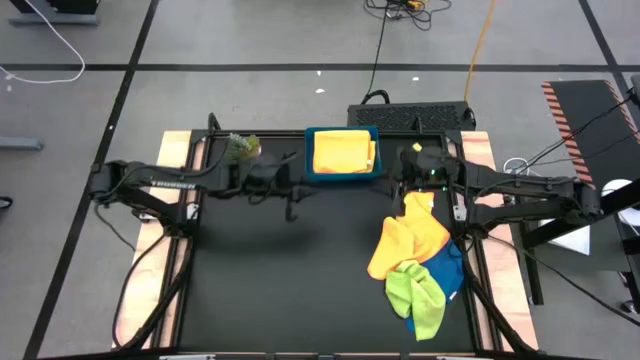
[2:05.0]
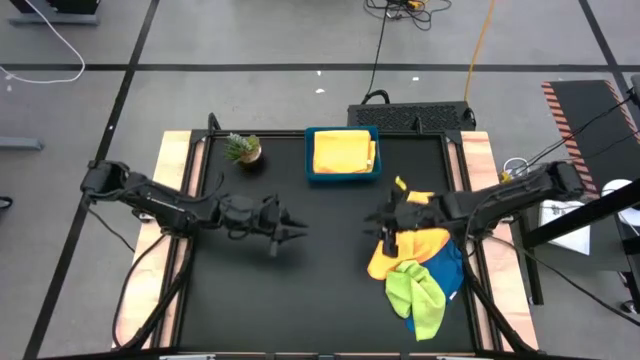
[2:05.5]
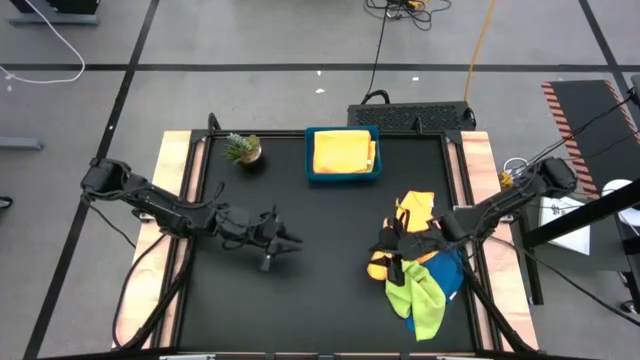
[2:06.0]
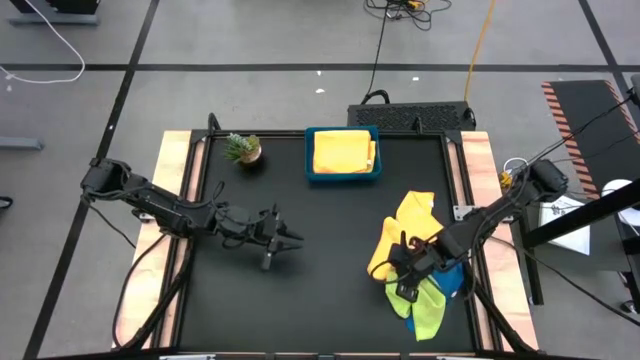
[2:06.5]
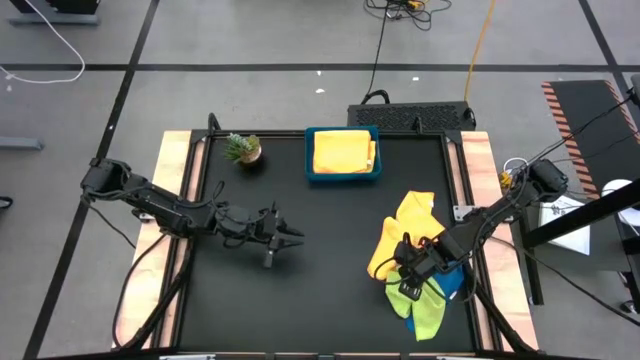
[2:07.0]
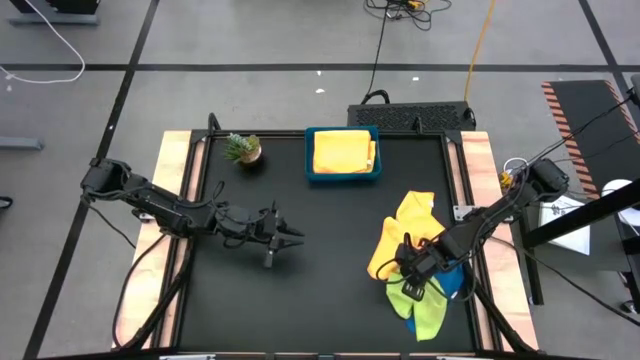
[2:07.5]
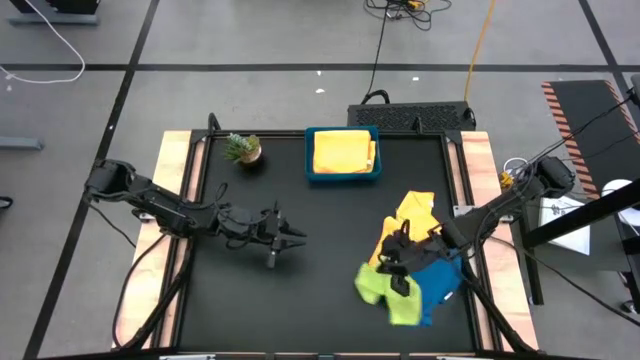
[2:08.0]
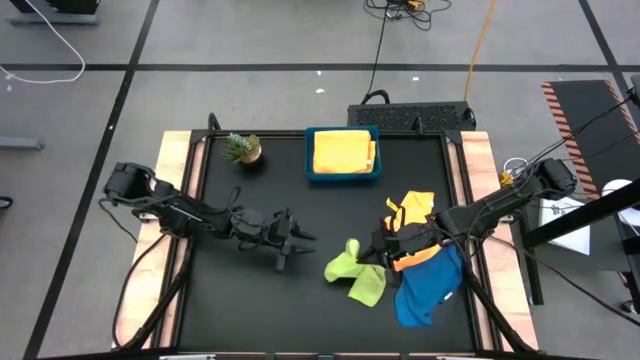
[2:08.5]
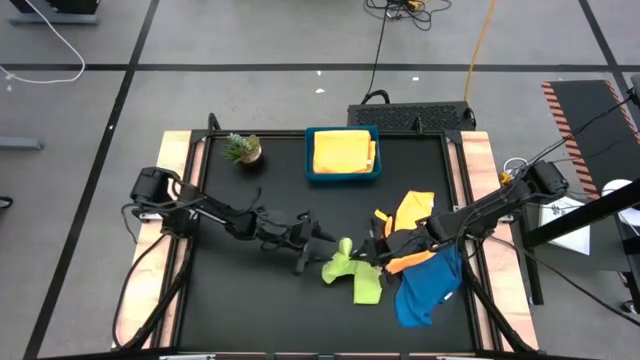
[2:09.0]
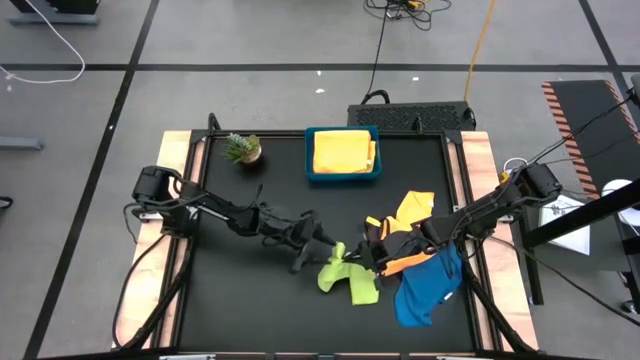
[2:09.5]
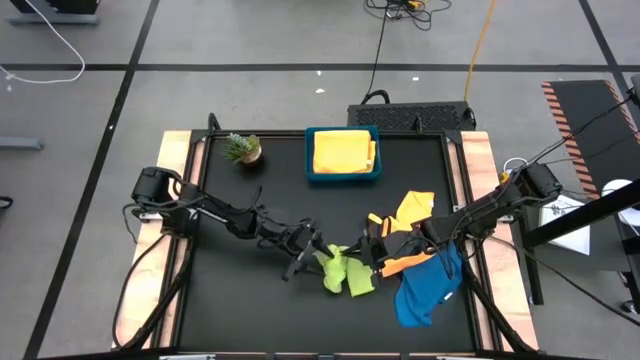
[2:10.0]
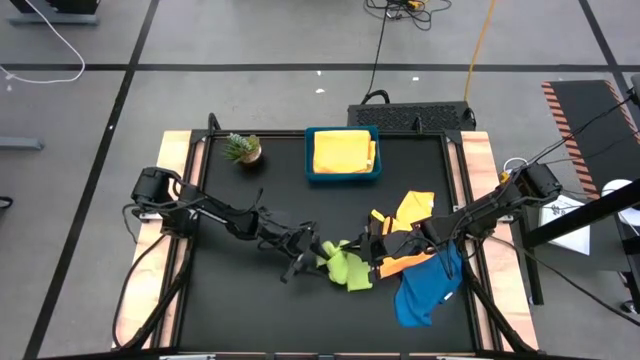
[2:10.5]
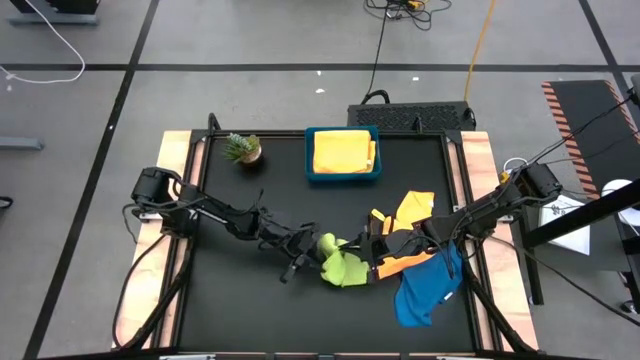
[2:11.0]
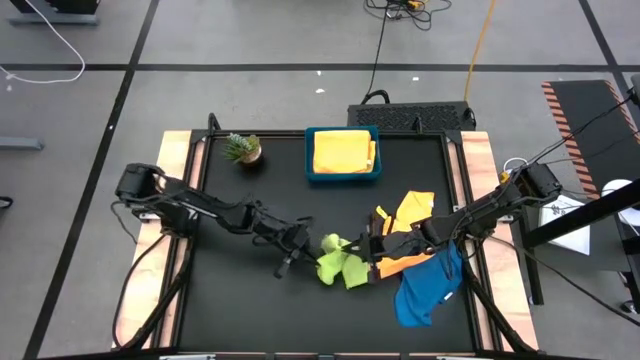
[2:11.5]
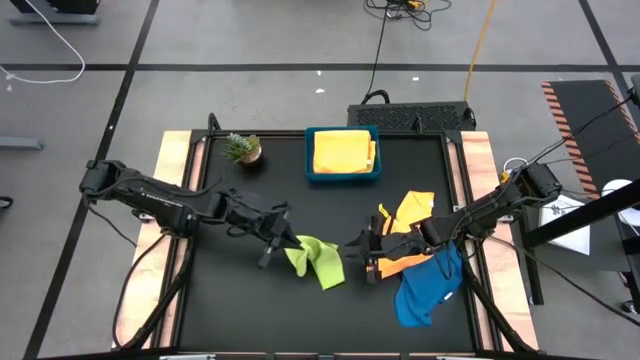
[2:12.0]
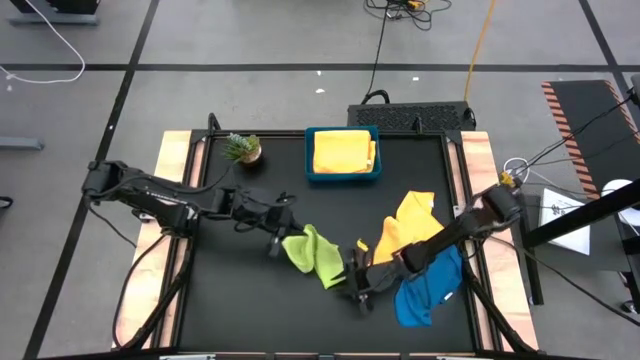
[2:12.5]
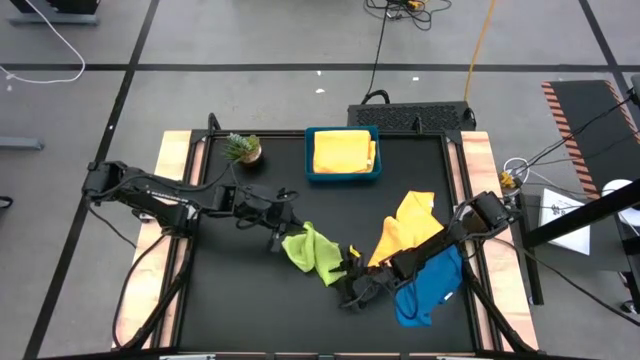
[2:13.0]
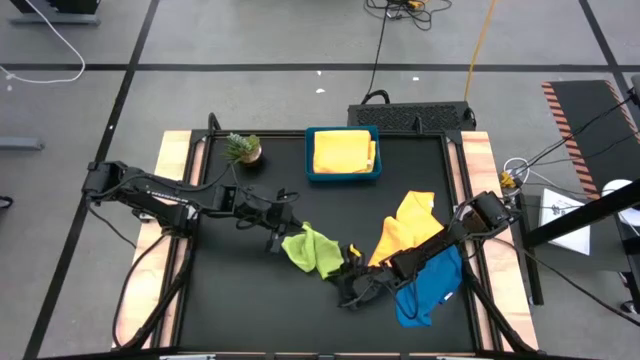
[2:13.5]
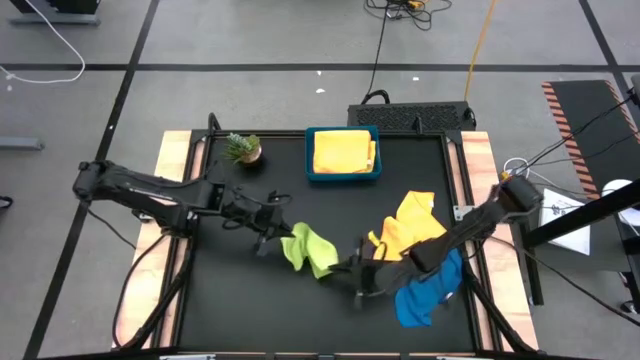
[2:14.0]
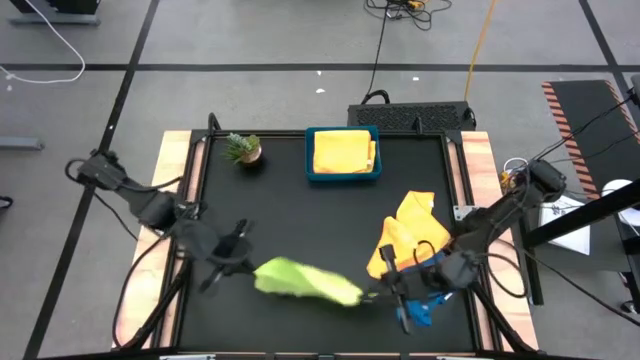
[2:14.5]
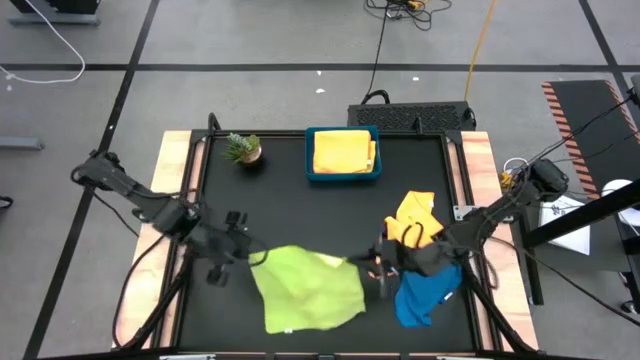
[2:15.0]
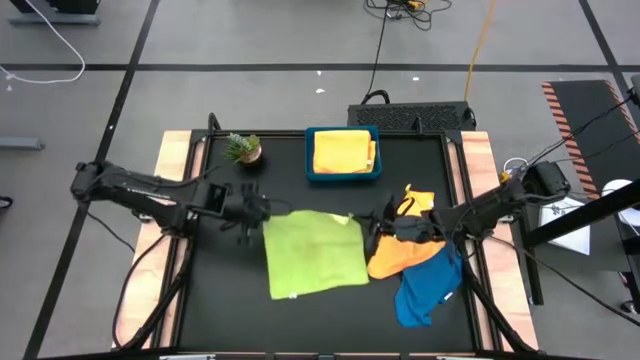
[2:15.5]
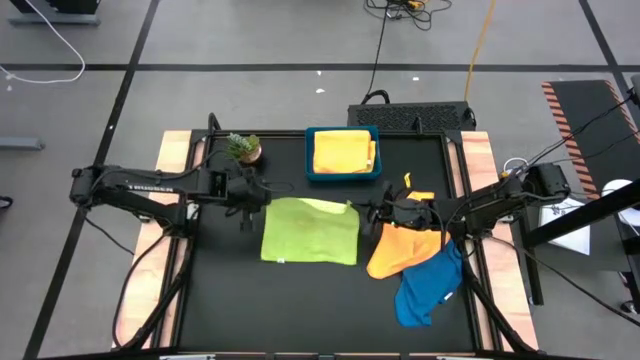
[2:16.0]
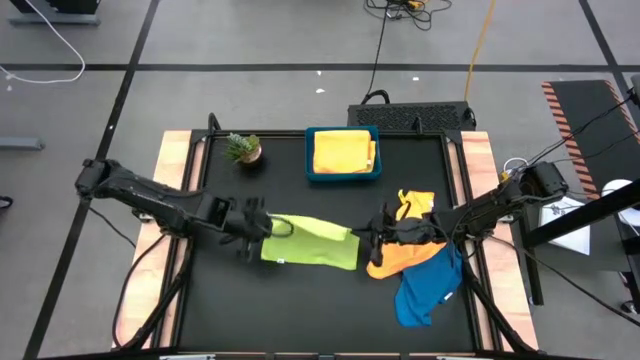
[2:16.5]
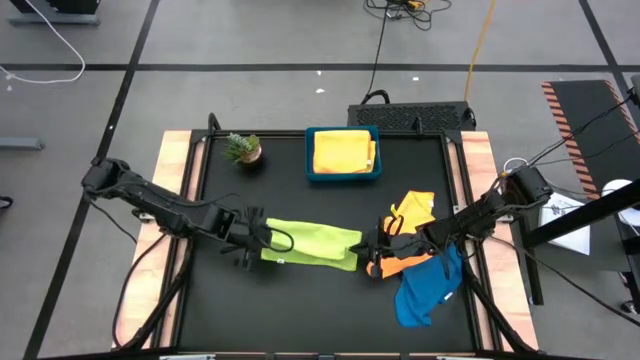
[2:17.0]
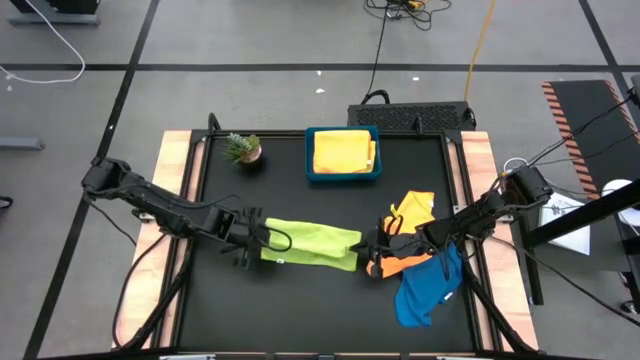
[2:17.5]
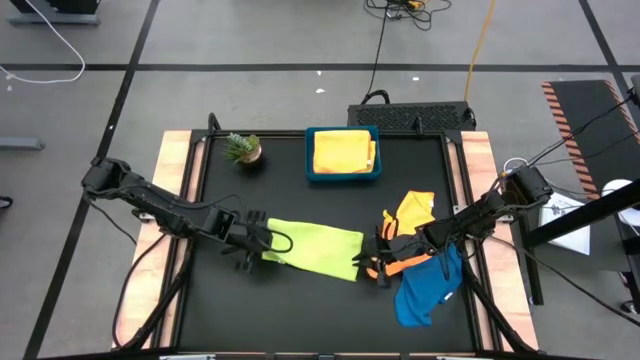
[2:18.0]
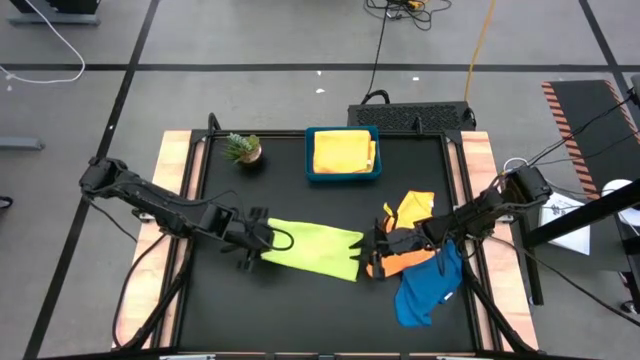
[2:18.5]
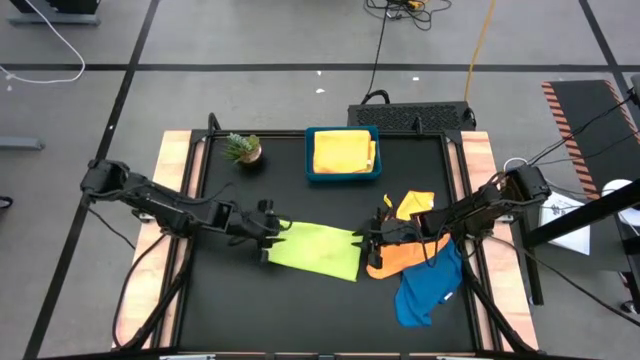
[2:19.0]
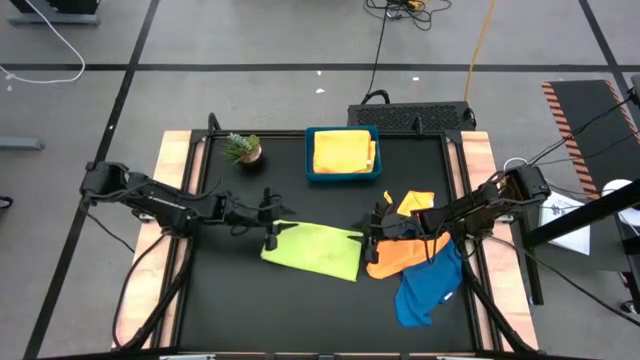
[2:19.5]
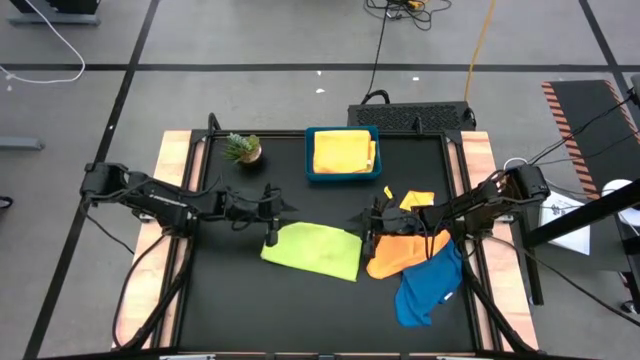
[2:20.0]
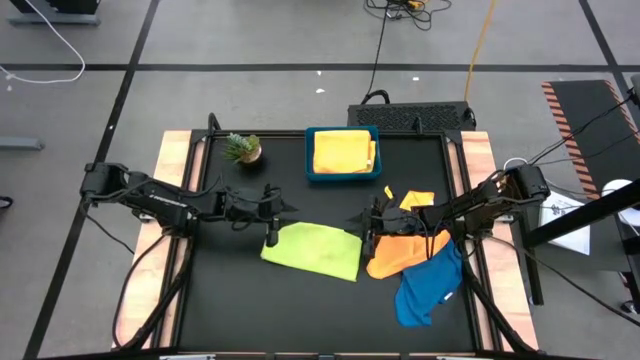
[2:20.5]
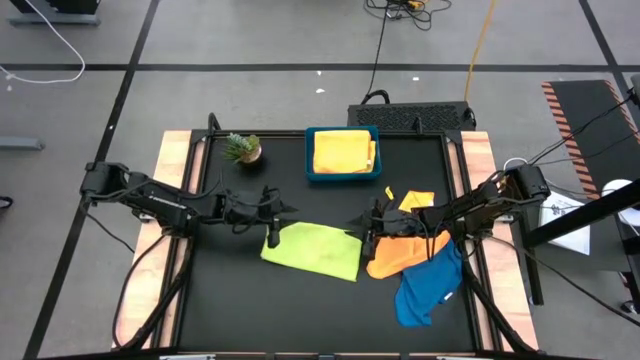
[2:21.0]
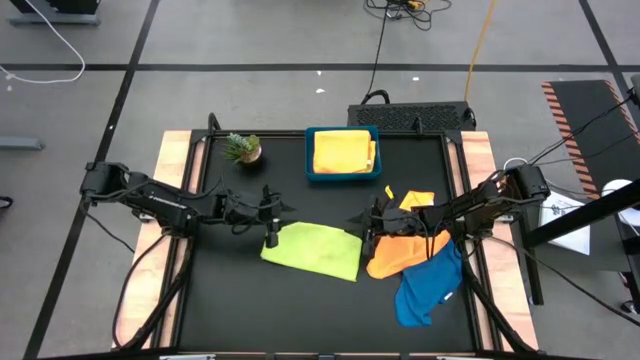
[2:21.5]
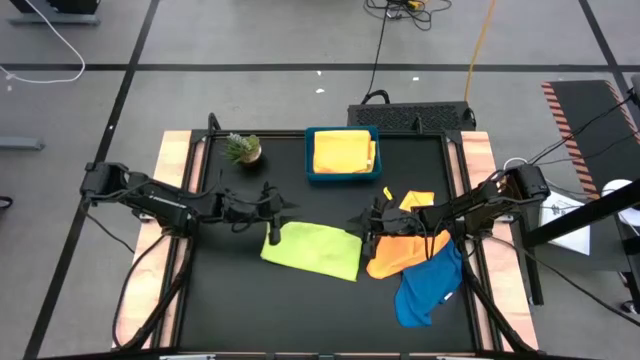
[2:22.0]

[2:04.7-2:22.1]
Task: Fold microfiber towels
Fold the green microfiber cloth

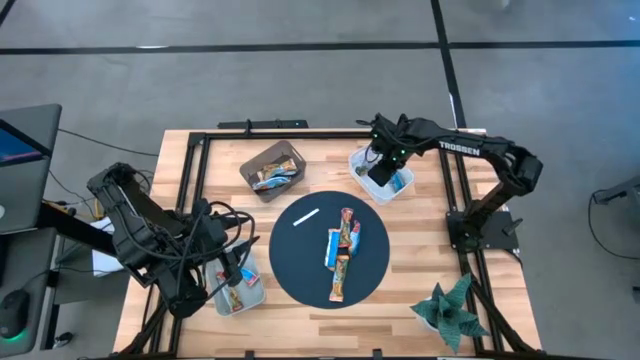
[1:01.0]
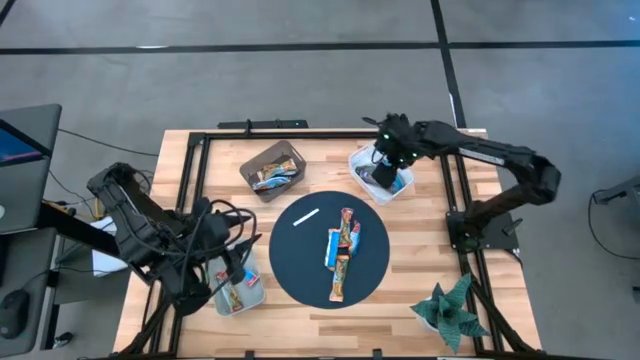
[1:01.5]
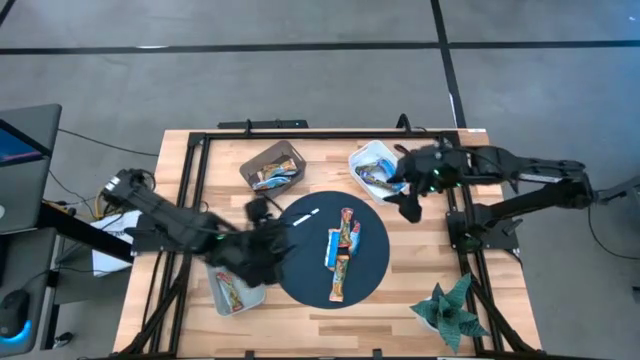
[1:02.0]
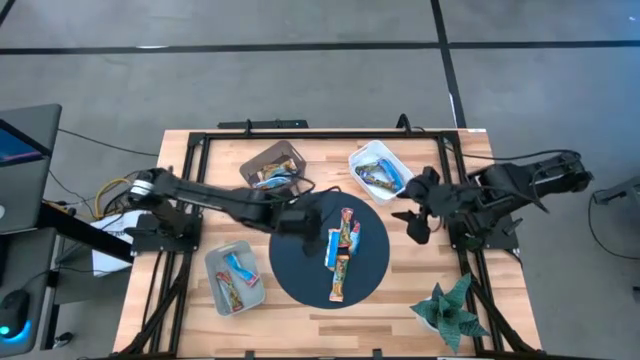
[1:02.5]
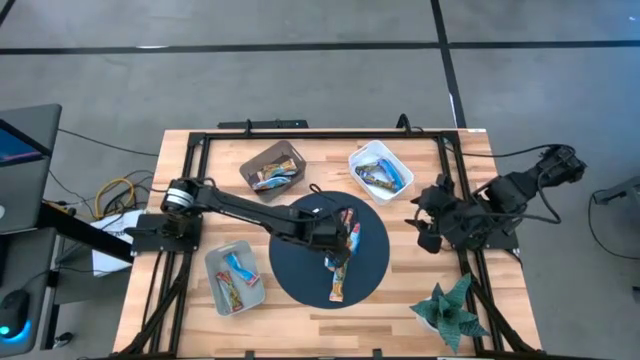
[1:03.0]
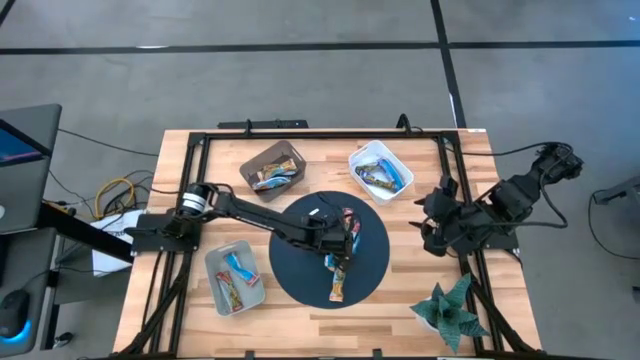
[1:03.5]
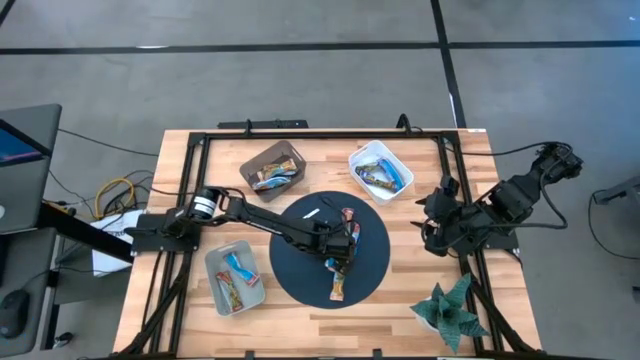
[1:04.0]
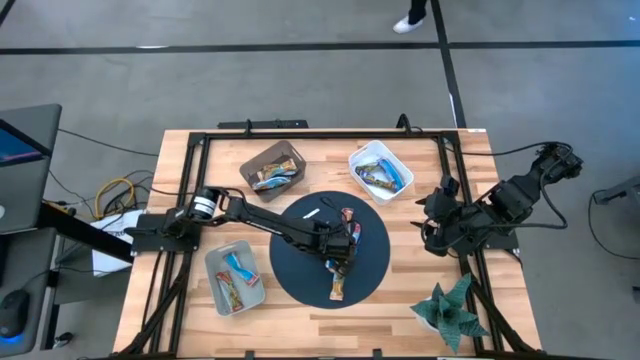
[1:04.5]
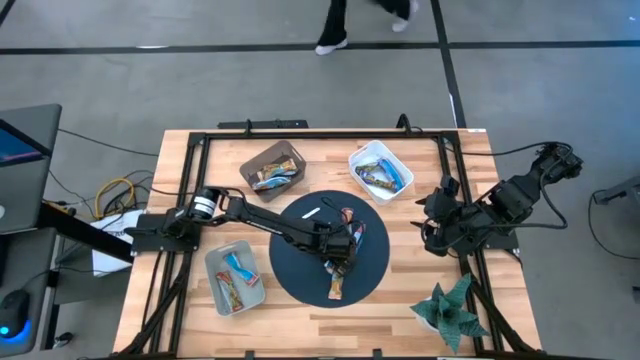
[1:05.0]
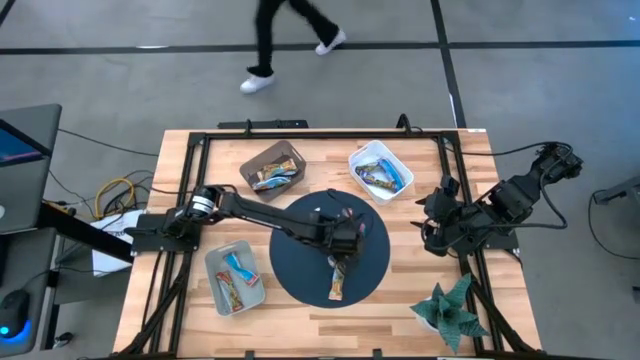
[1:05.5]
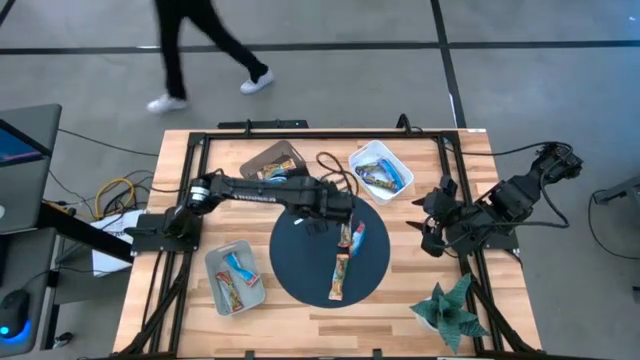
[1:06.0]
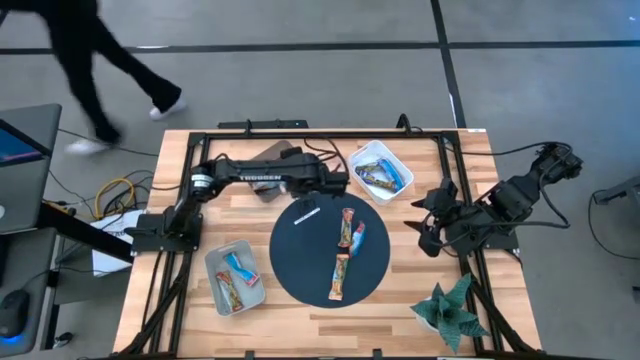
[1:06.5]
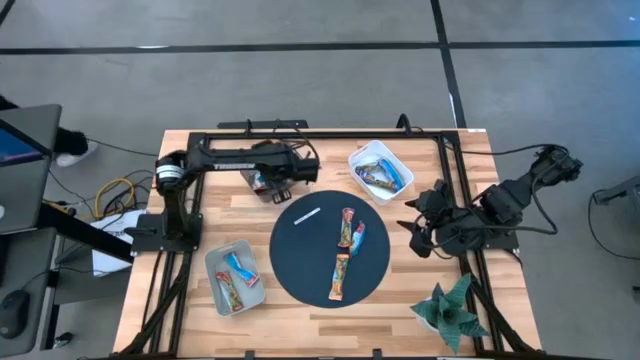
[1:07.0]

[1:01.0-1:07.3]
Task: Pick and place Granola Bars by type
Put the yellow granola bar into the black bin
